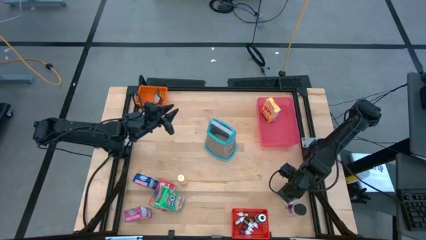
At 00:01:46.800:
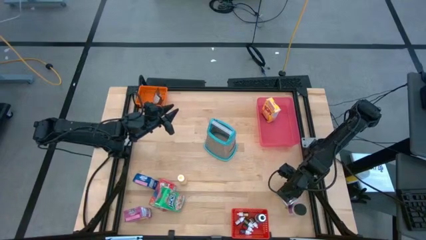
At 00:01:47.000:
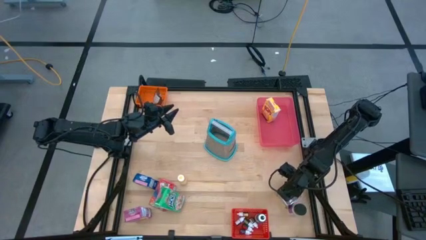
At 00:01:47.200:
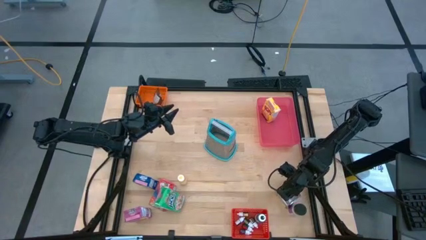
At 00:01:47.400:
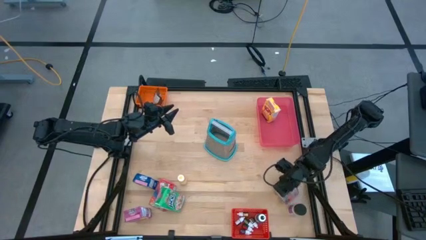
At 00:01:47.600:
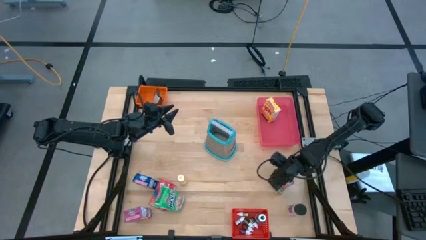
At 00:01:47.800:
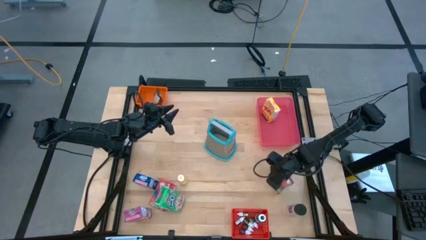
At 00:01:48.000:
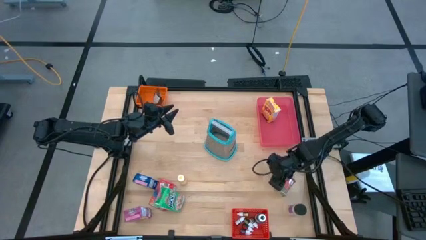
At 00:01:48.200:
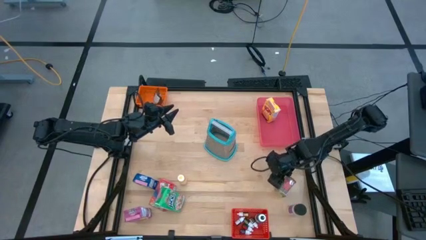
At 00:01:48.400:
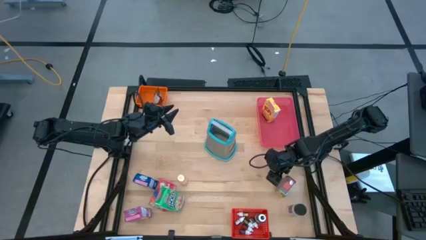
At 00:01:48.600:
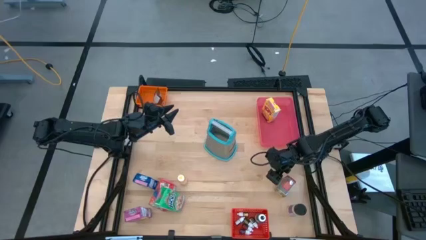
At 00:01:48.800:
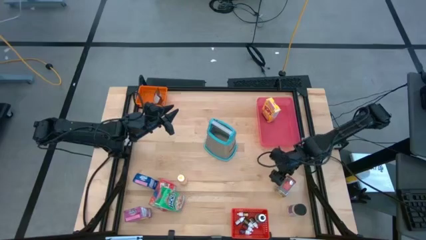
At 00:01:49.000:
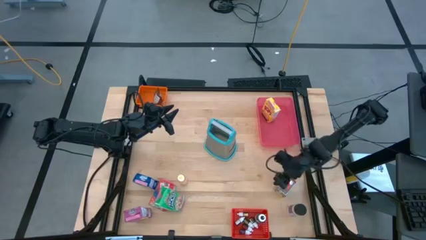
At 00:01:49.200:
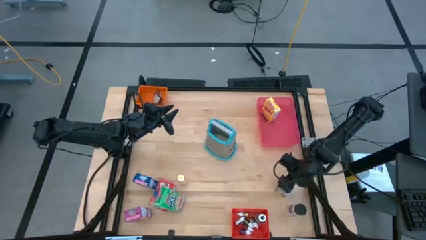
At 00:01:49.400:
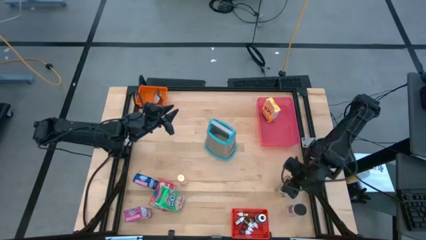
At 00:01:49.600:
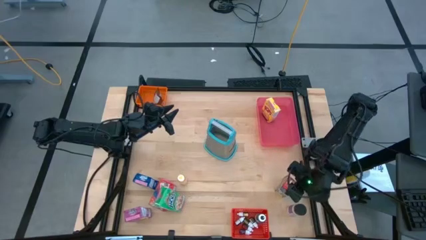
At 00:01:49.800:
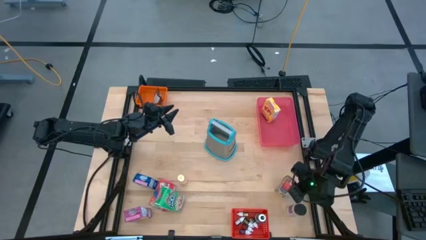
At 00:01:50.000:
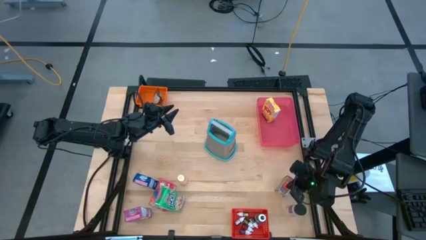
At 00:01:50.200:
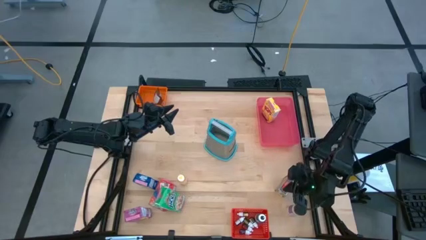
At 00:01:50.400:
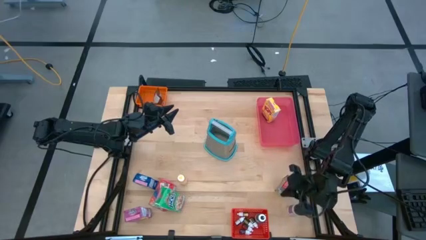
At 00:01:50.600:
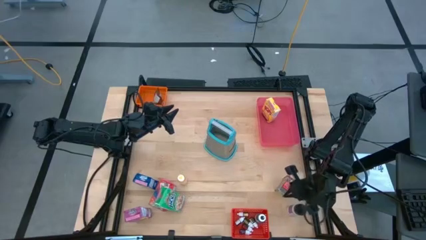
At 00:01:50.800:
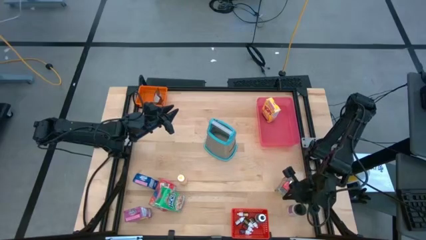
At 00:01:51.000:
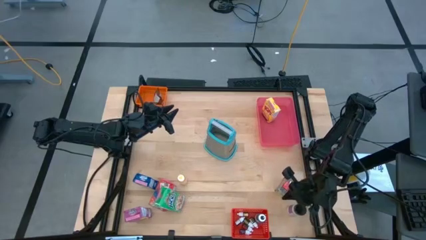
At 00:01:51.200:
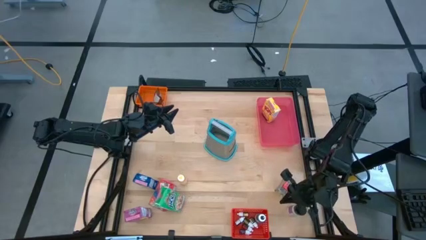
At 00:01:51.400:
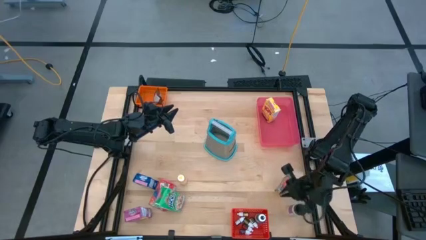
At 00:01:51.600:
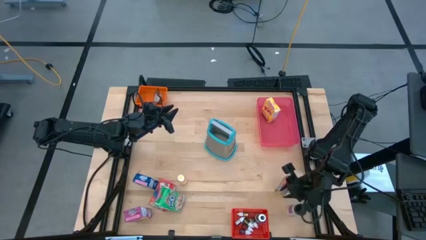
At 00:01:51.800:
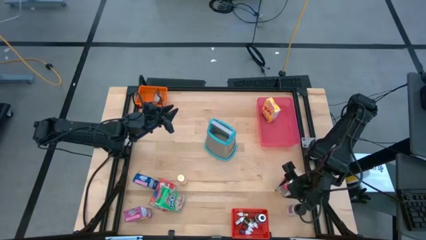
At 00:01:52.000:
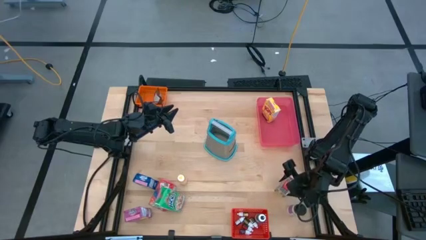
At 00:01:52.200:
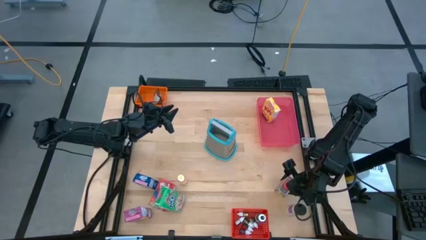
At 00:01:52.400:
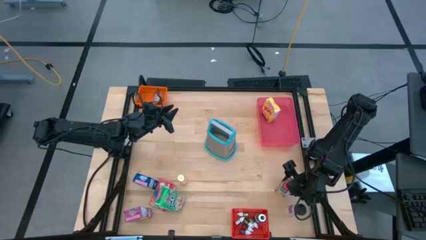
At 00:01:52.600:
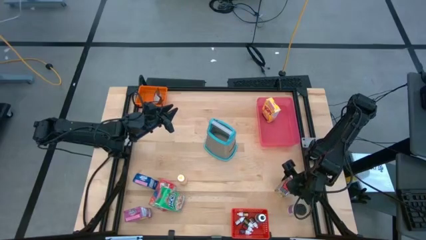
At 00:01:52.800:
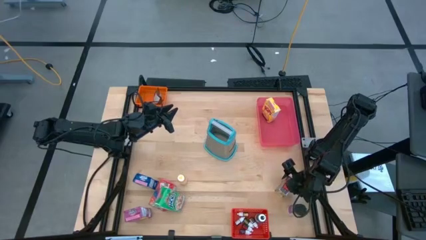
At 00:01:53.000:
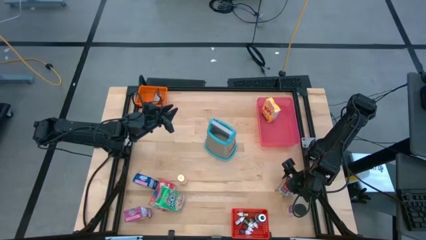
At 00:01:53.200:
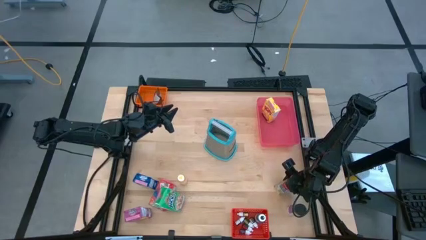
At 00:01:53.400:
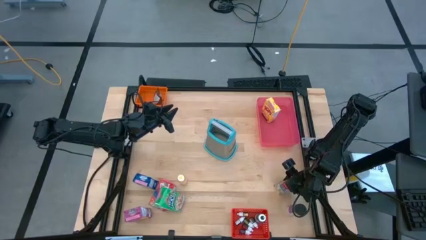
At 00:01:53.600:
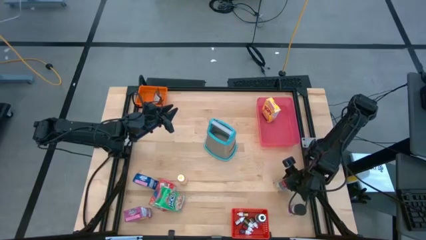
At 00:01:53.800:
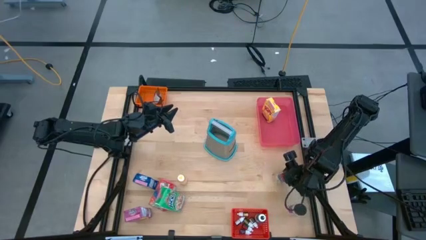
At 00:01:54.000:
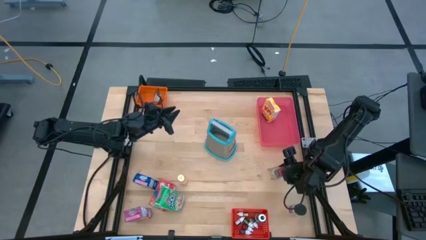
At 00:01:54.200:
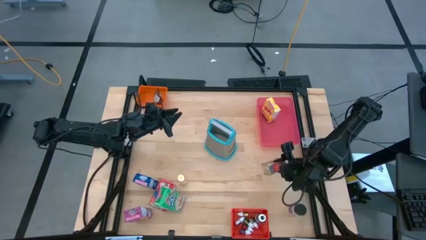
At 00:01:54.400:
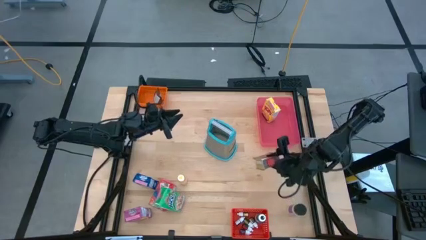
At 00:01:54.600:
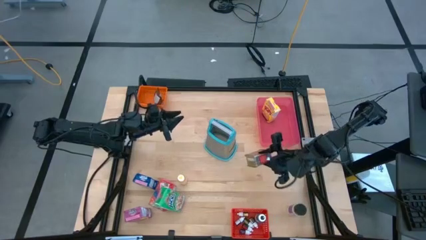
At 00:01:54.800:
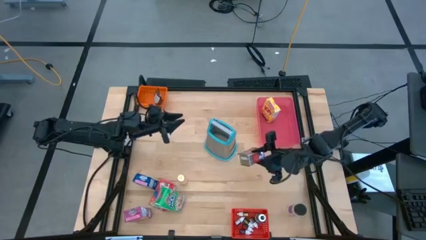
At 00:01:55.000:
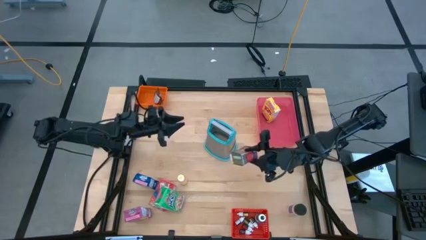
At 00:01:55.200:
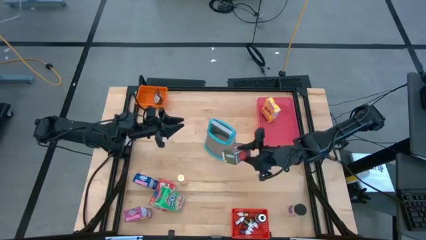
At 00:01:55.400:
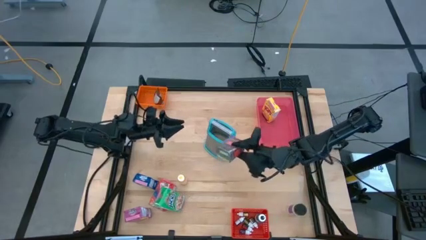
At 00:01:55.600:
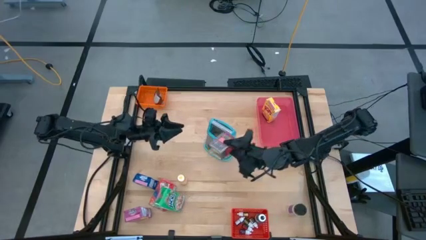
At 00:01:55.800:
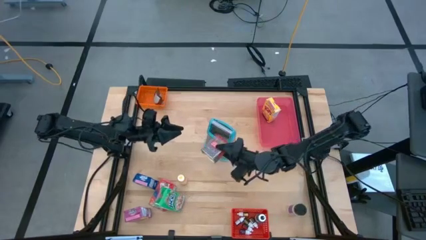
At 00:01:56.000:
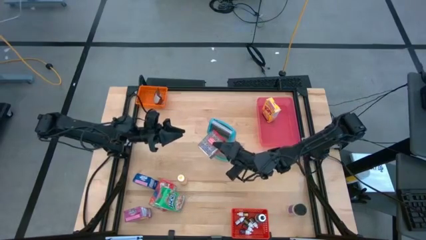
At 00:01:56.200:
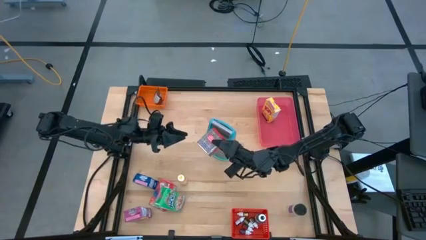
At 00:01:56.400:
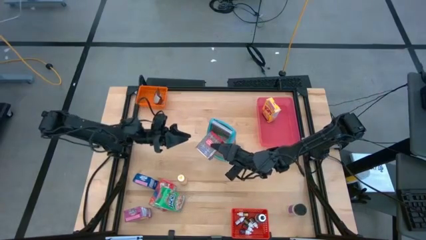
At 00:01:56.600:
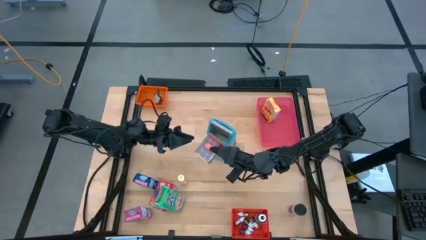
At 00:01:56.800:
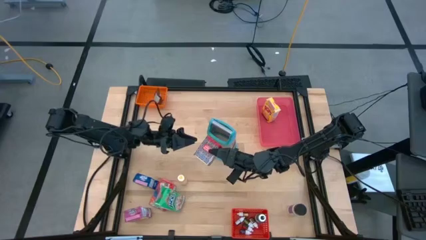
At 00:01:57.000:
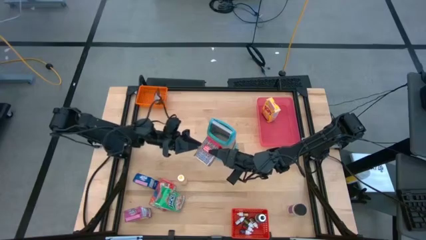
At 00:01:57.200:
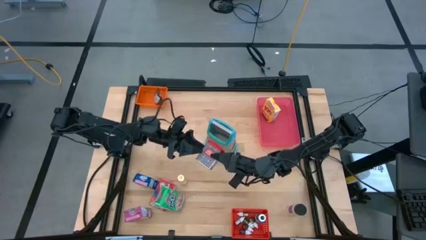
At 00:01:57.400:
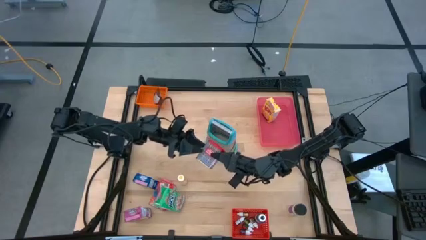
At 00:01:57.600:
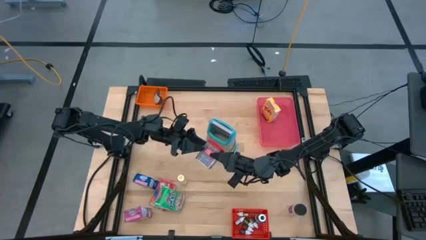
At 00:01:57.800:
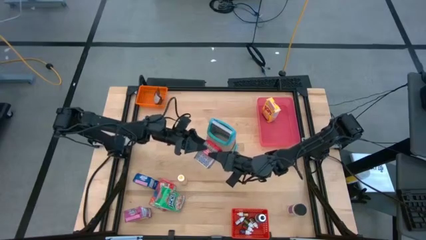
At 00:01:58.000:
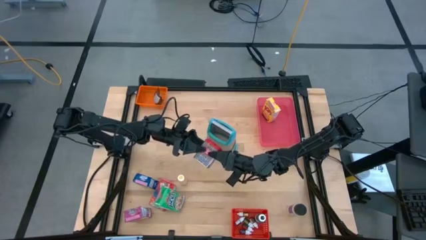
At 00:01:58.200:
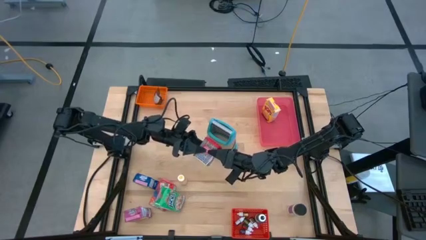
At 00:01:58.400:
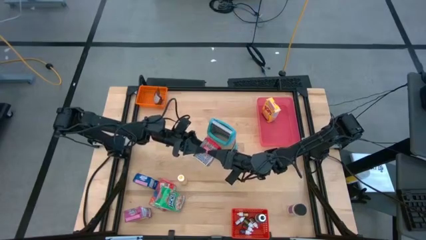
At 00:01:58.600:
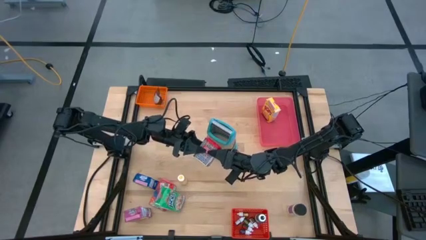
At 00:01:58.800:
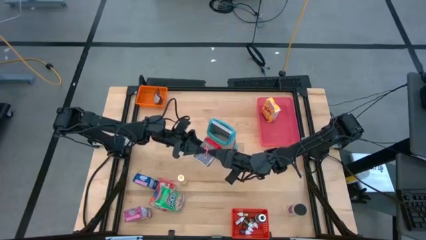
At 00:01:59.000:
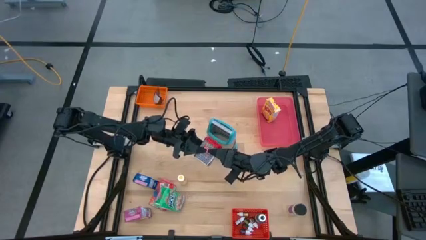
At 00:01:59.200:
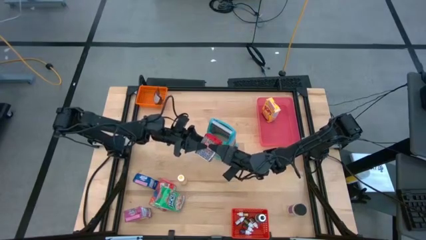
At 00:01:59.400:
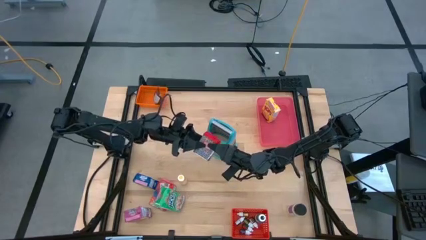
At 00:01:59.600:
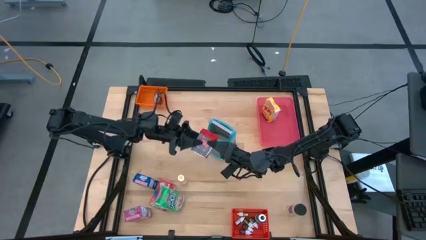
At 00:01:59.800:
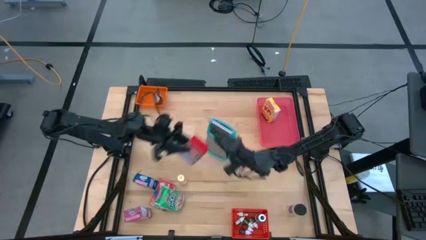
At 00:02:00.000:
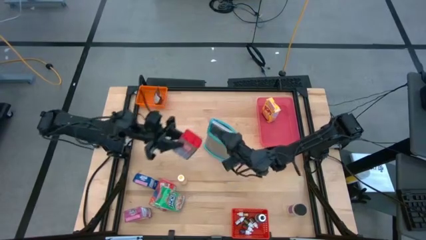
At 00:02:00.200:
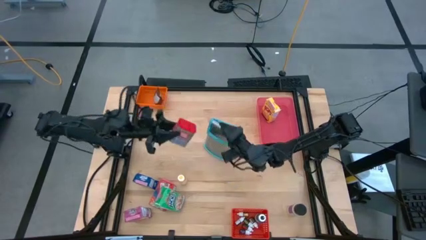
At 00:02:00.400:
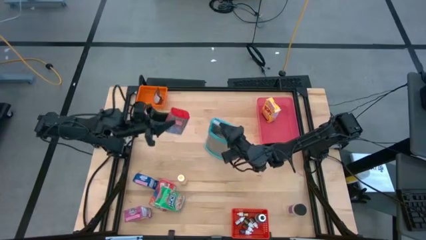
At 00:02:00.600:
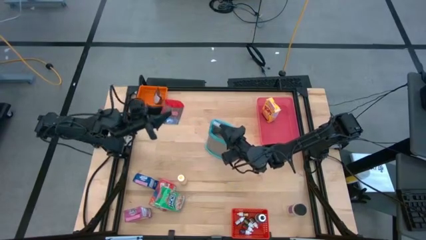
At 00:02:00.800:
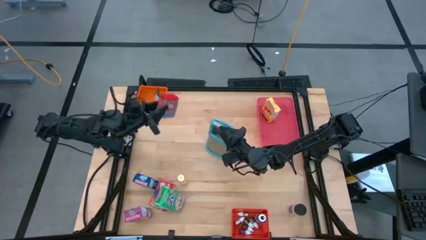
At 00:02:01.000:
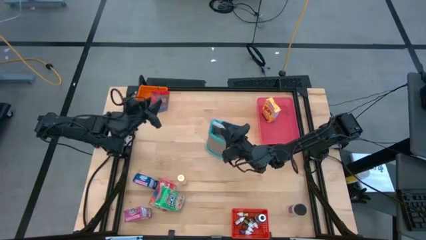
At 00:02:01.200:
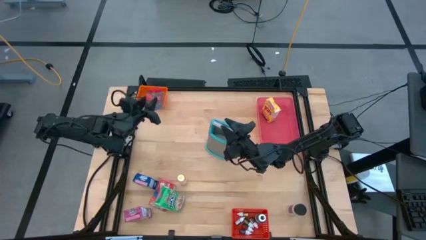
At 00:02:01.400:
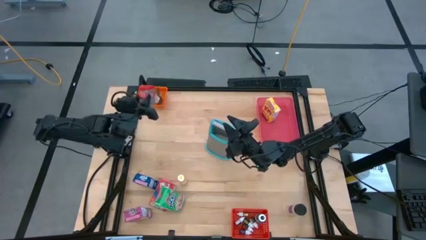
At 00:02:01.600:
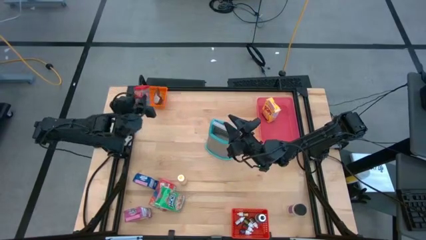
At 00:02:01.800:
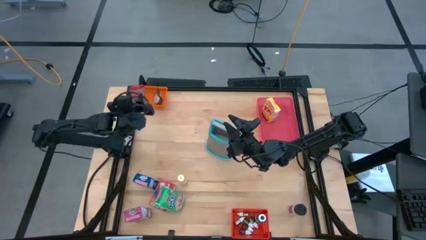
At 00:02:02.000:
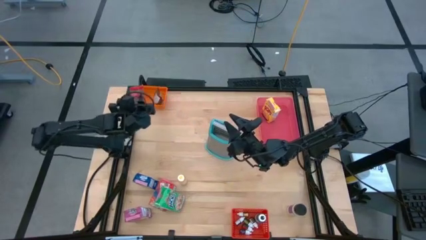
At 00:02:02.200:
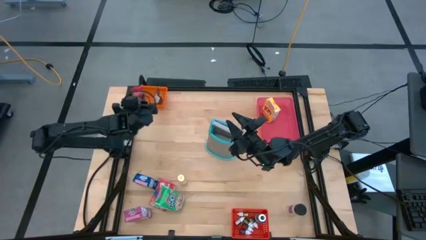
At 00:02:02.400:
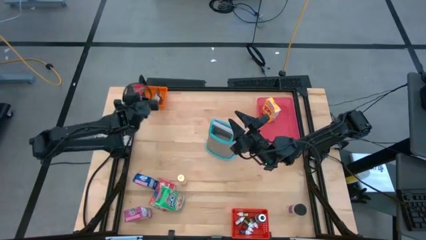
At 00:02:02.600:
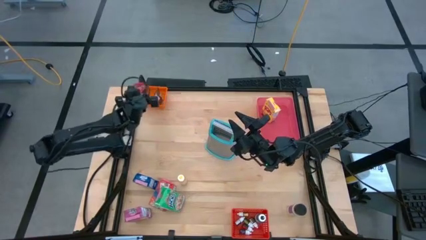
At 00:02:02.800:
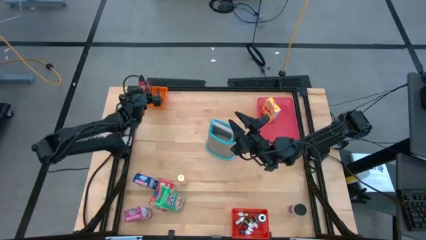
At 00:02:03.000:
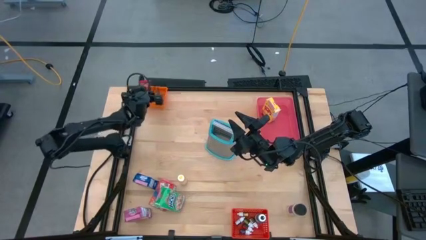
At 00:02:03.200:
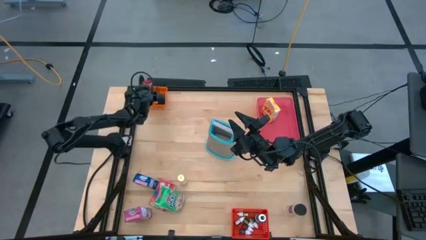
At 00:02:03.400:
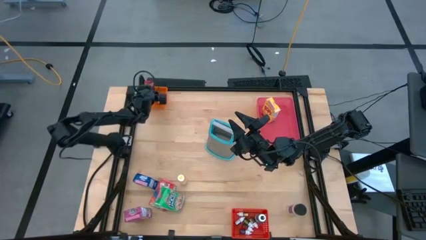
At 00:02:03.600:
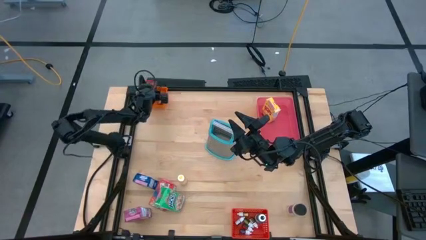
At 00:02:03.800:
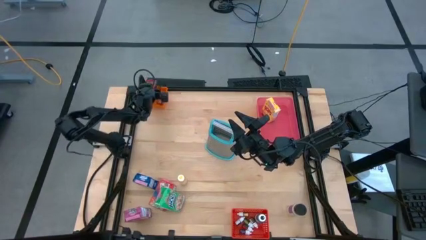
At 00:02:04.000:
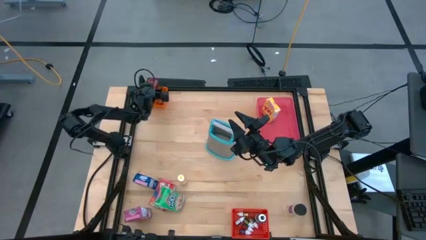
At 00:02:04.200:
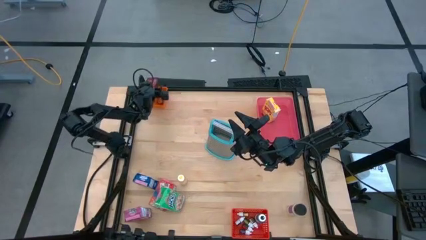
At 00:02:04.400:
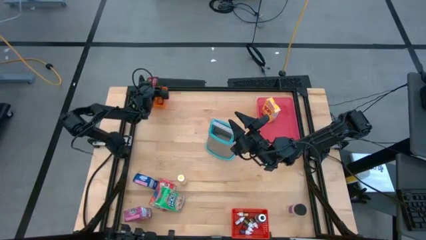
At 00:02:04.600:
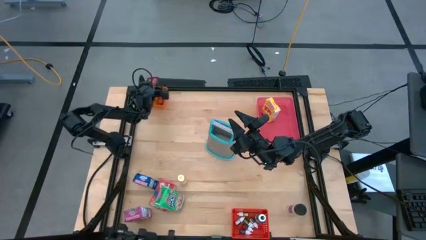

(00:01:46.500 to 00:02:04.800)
Task: Pick & Place Kitchen Items
Put the red seasoning can into the orange bin
